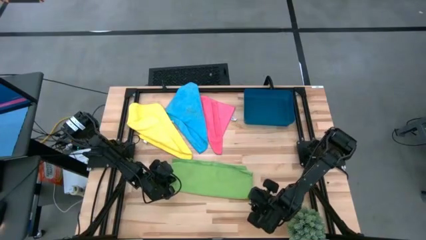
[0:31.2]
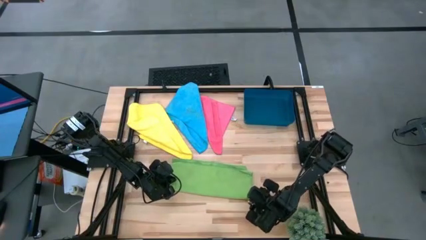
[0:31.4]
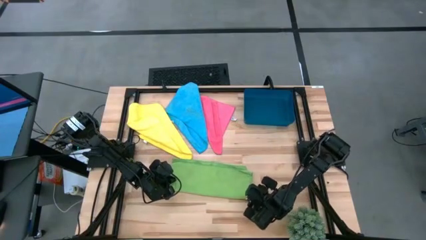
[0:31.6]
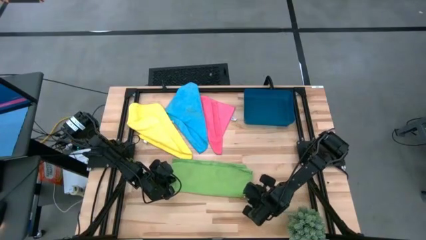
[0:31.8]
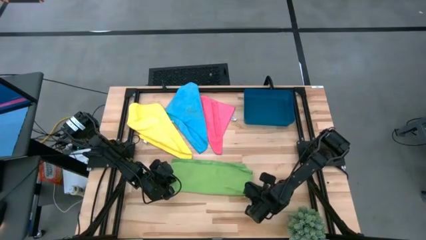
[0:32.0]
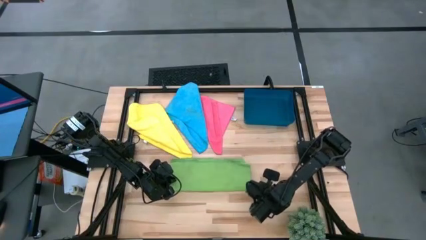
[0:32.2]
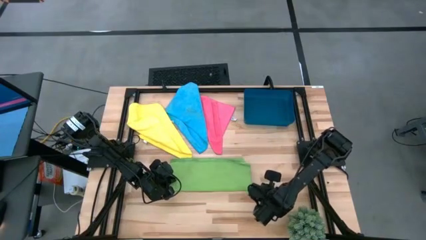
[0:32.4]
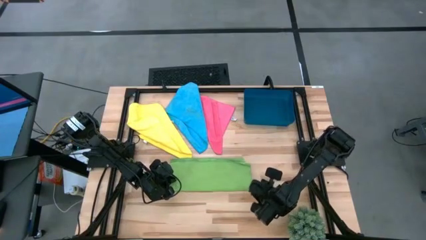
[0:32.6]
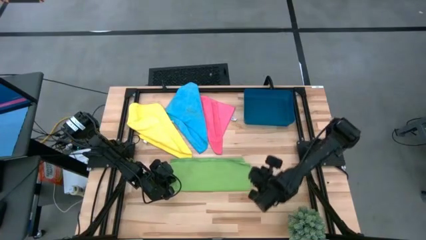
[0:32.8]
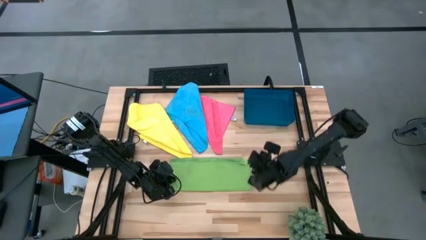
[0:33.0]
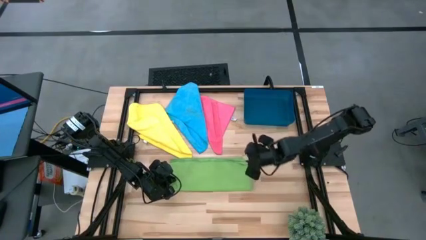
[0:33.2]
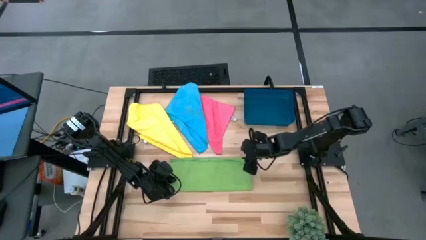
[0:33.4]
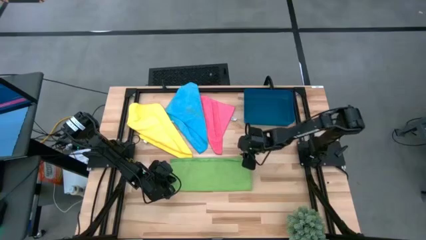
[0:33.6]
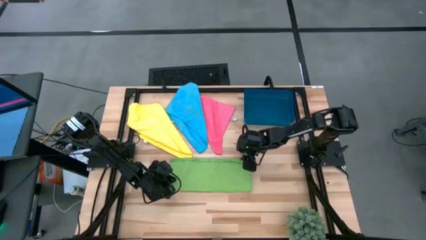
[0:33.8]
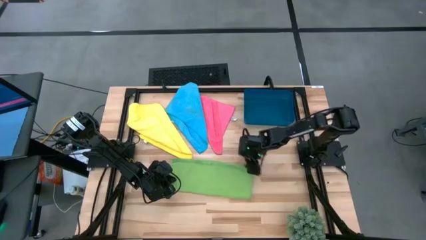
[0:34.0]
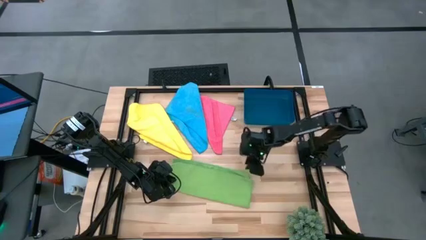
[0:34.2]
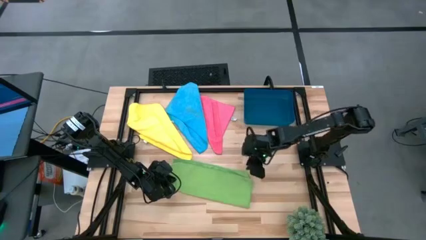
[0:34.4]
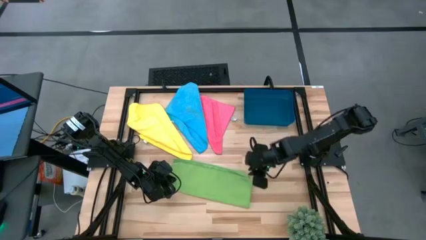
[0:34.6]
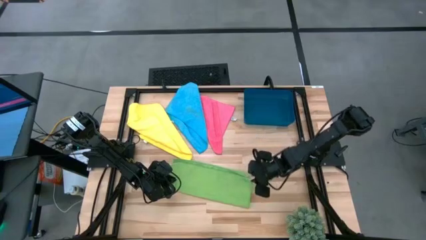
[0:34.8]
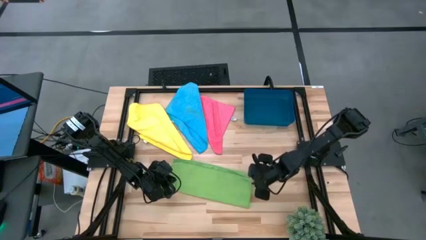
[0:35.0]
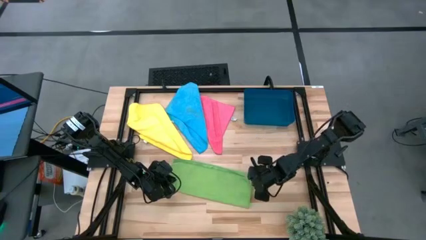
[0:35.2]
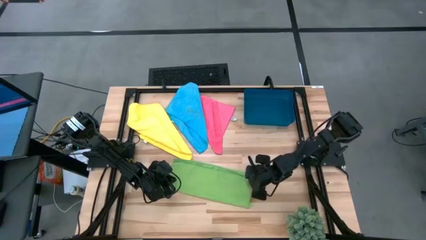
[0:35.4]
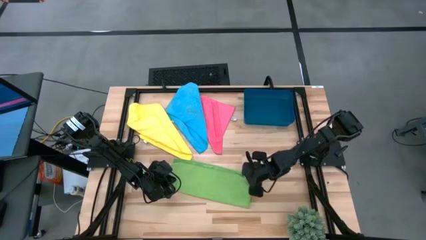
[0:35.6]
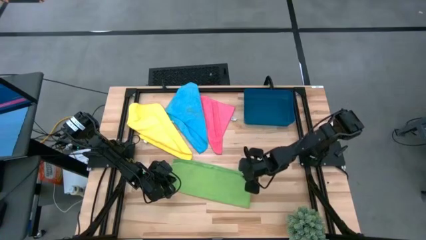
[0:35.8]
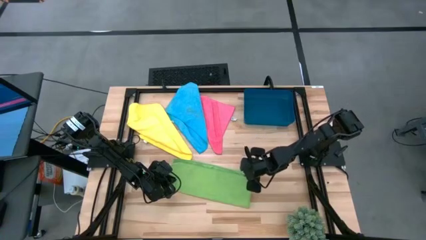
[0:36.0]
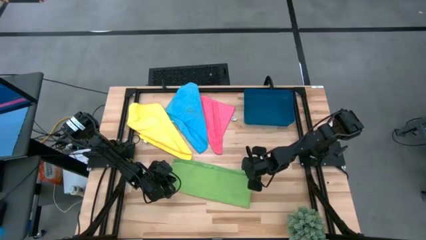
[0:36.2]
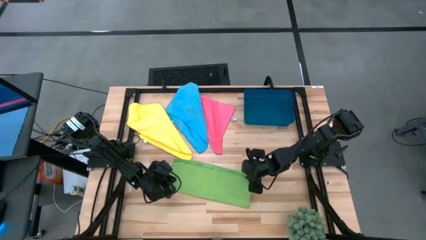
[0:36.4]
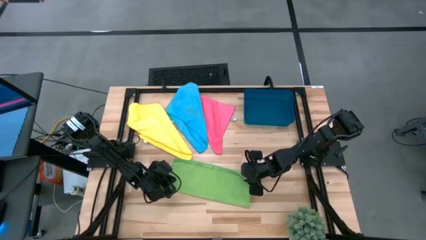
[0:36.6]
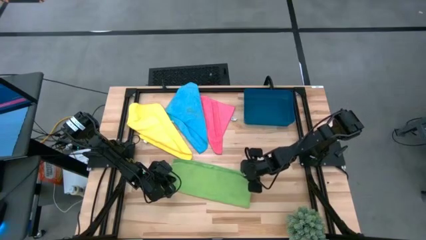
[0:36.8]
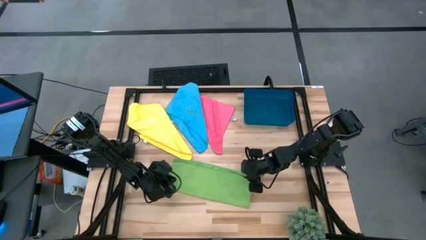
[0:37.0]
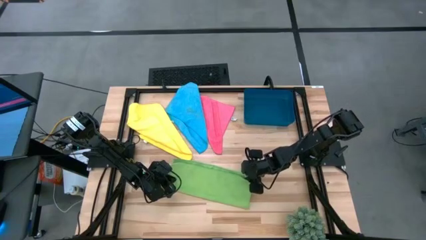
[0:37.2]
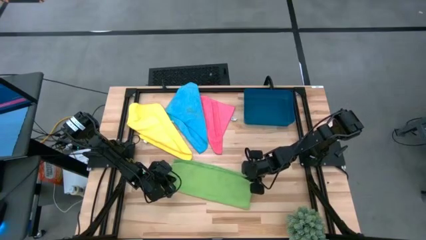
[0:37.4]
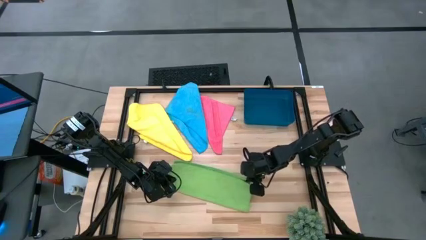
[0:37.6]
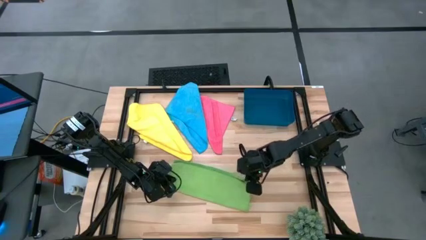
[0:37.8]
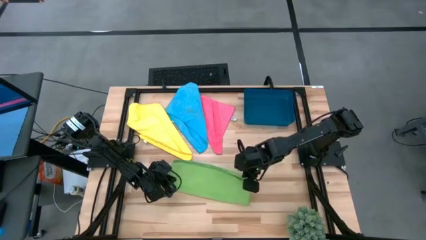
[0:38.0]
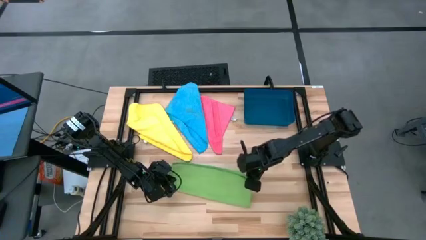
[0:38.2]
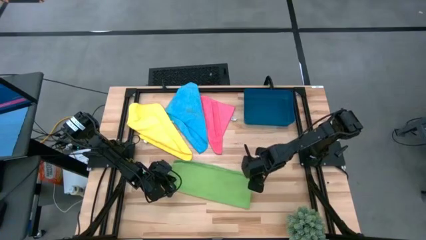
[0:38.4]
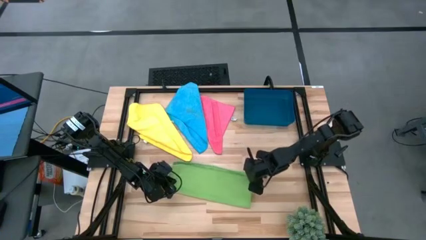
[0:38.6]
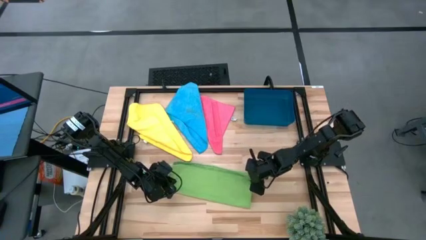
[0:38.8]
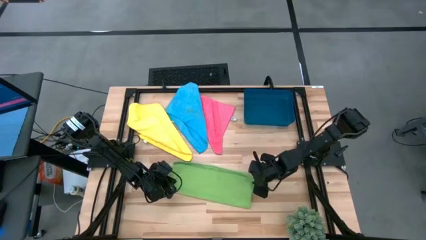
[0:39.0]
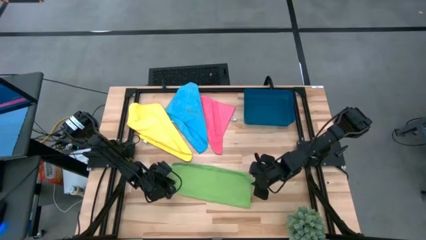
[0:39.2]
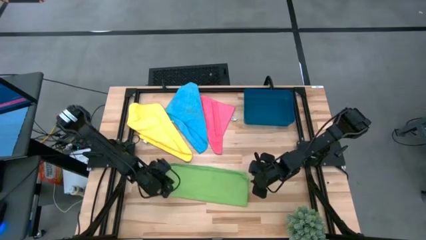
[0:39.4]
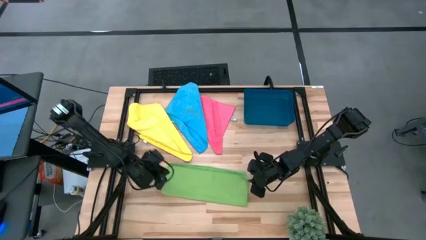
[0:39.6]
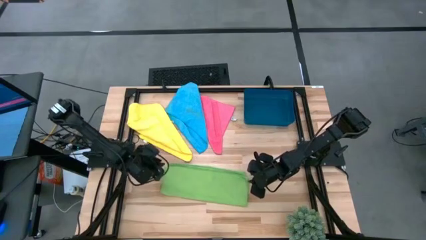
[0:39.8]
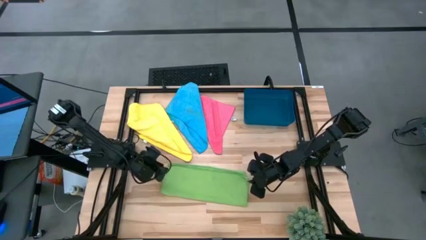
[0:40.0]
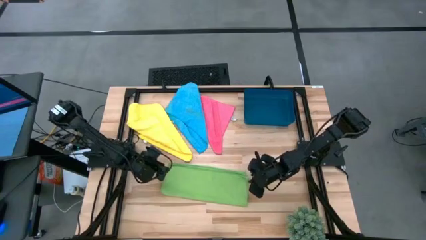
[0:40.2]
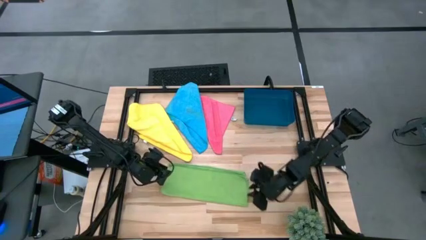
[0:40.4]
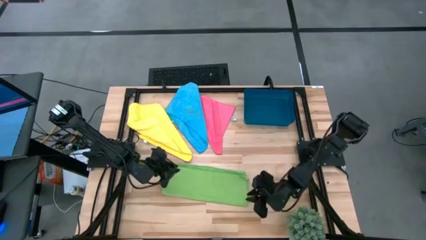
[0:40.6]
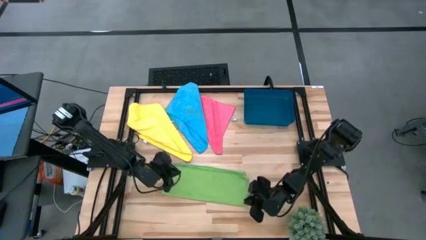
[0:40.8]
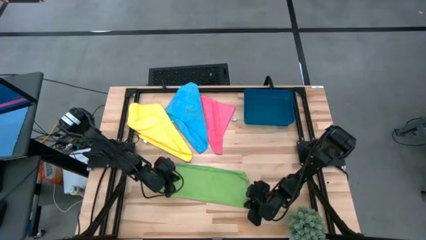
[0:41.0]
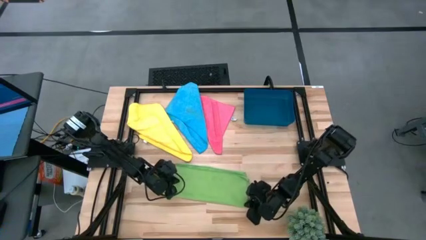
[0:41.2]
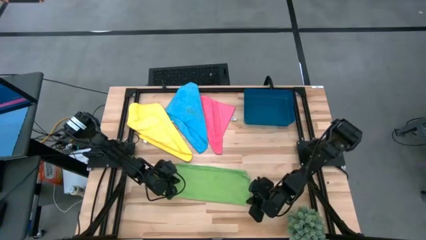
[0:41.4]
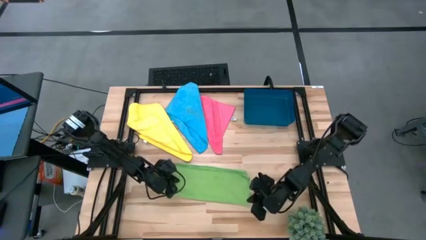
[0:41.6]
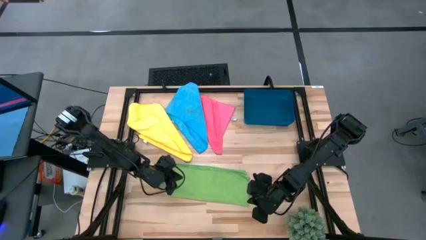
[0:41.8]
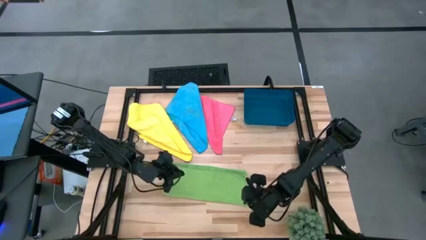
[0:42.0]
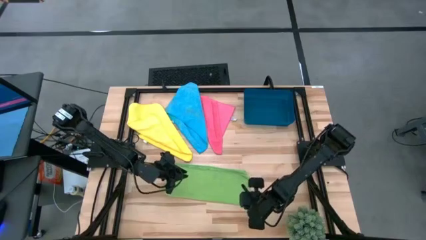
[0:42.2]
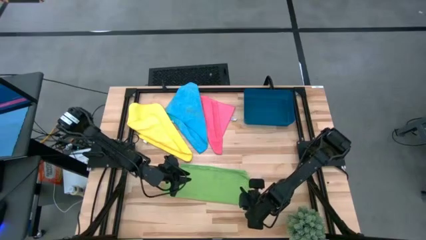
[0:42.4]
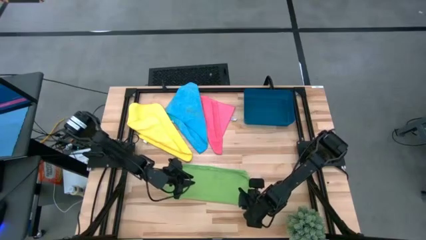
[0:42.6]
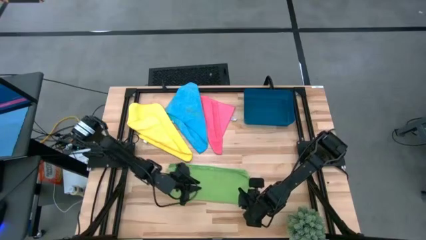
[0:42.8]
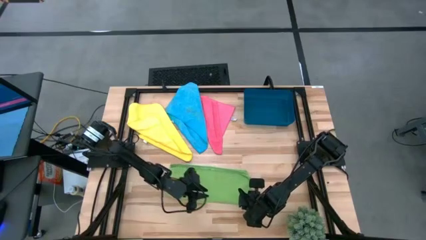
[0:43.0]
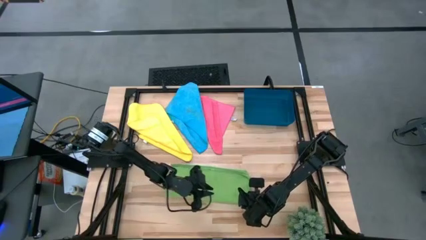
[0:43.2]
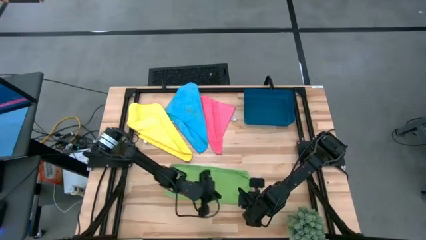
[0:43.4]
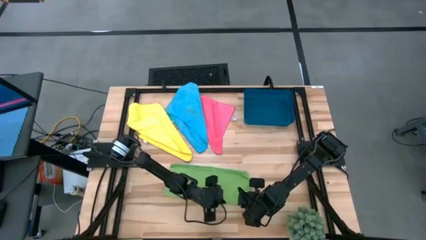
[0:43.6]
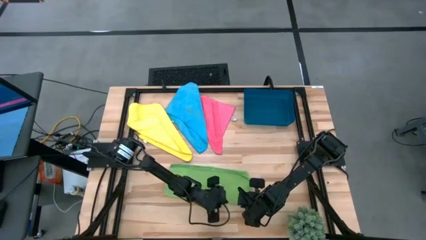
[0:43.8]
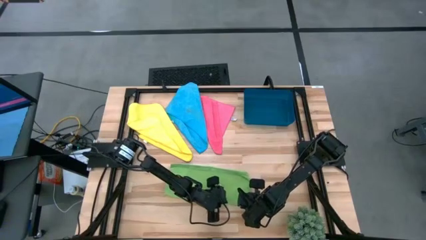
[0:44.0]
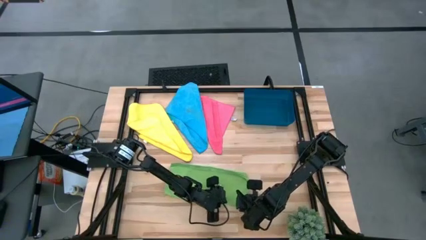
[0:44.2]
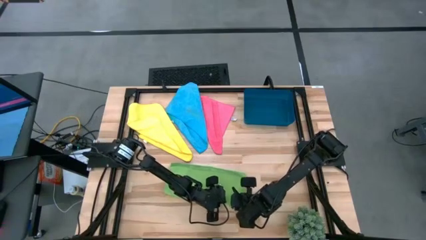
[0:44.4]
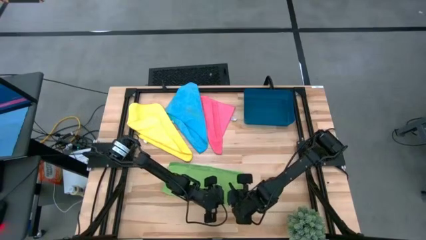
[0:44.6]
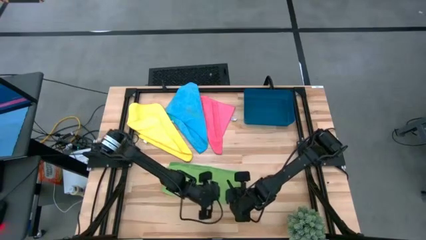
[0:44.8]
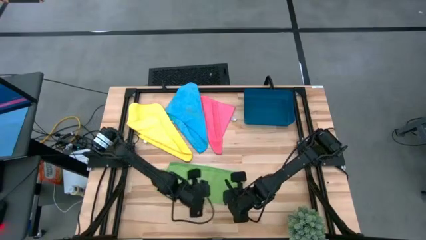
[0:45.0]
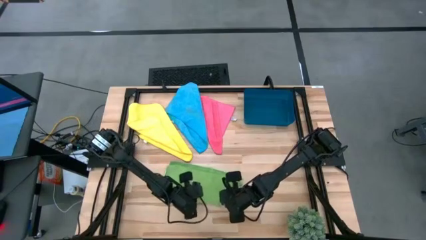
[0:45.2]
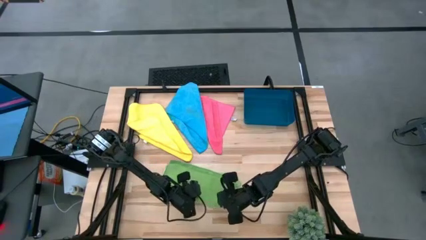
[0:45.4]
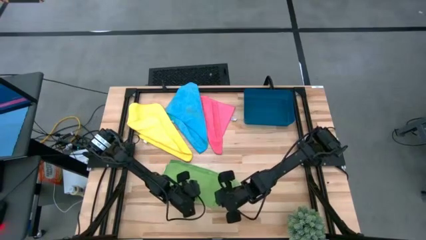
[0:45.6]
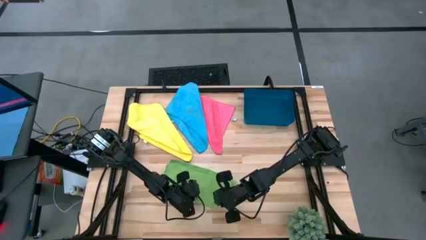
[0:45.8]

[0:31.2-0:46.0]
Task: Fold microfiber towels
Fold the green microfiber towel

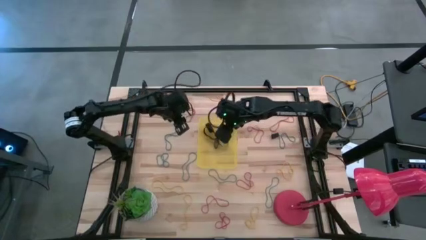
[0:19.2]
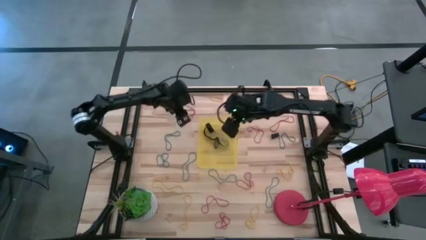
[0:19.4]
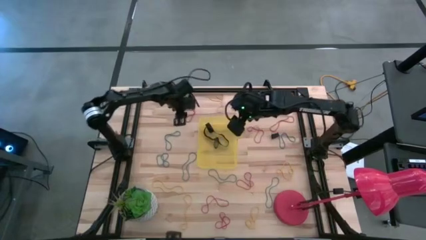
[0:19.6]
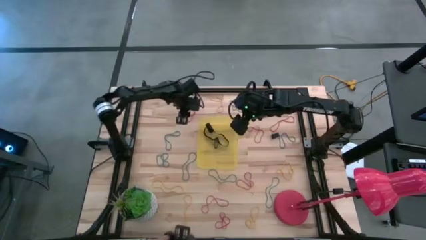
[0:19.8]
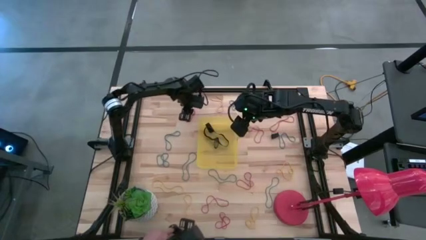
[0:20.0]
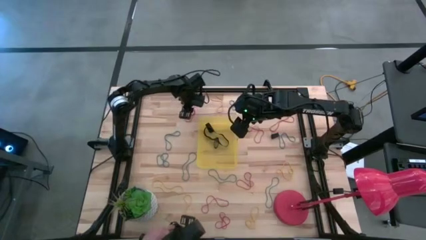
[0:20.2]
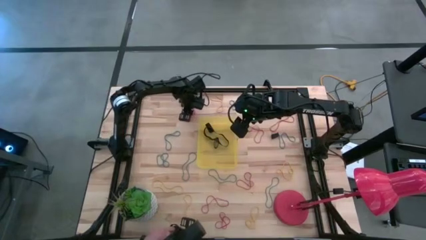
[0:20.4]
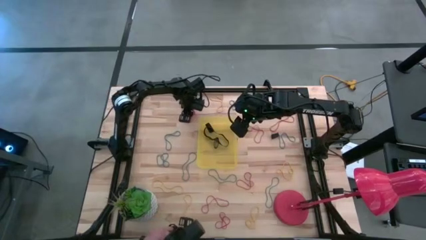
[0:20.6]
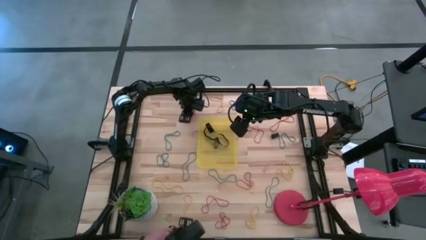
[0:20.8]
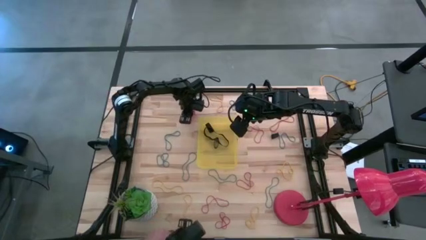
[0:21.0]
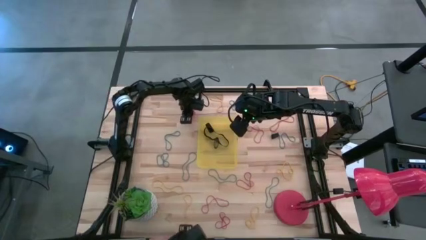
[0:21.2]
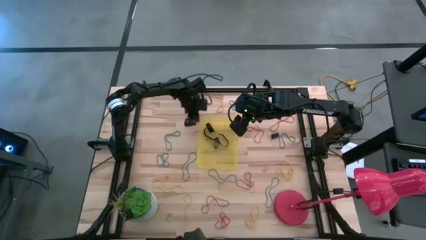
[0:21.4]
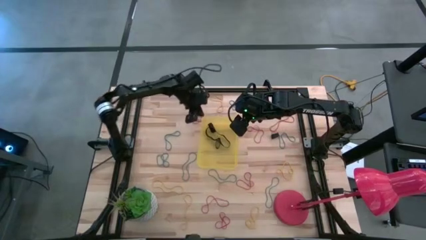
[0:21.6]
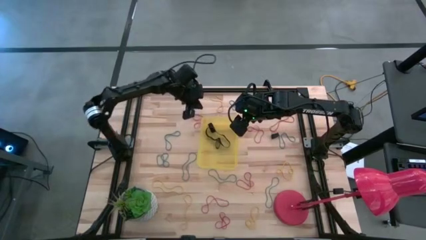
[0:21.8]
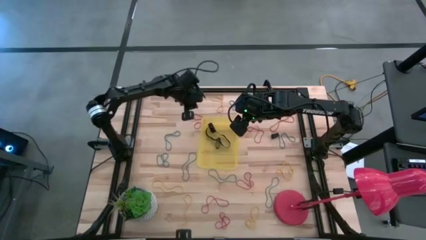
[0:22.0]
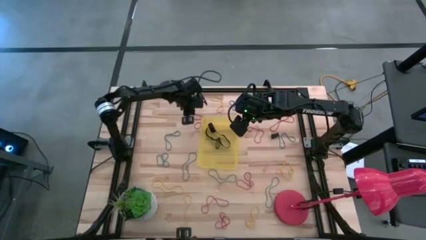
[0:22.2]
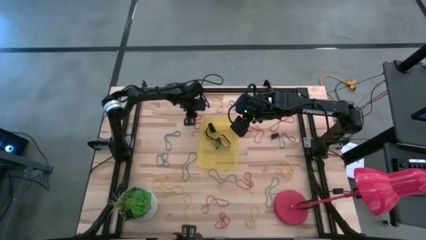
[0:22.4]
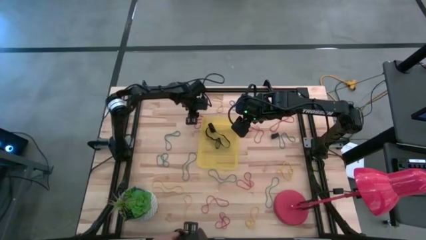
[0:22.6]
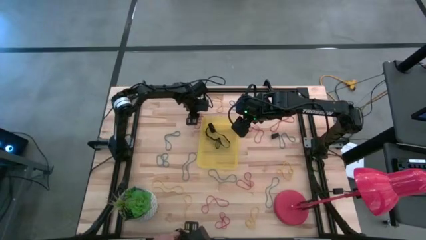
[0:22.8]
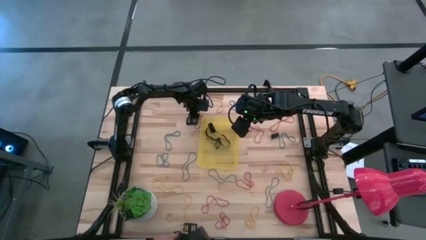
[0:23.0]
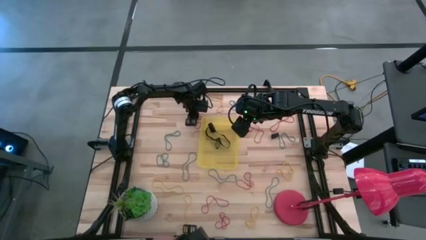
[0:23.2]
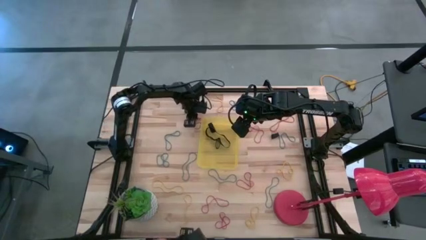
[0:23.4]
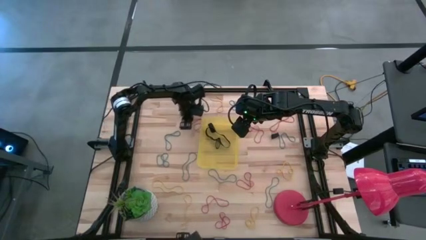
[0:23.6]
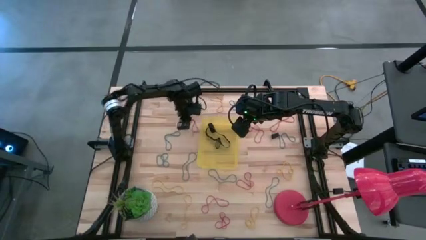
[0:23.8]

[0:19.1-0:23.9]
Task: Pick and place rubber bands into bin
Put the red rubber band into the yellow bin
